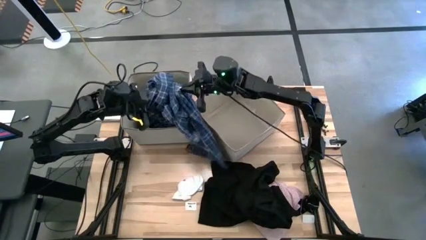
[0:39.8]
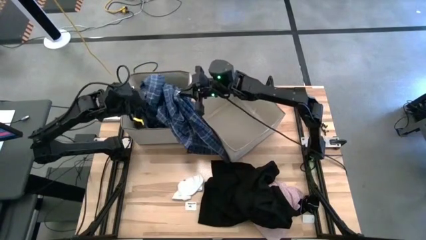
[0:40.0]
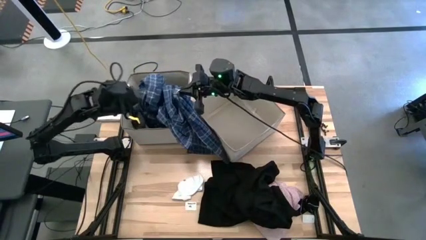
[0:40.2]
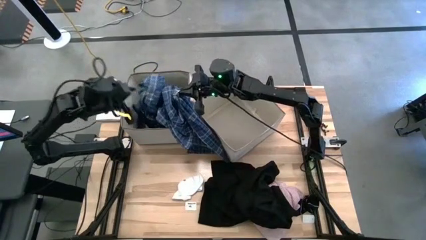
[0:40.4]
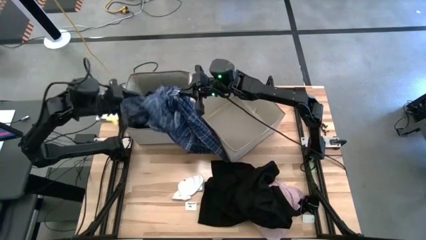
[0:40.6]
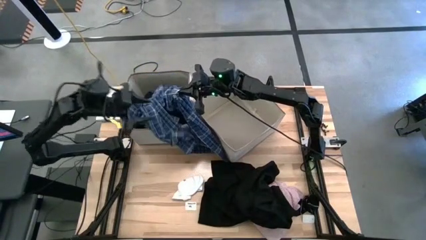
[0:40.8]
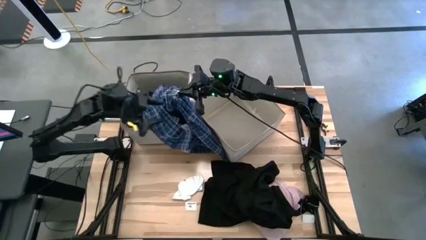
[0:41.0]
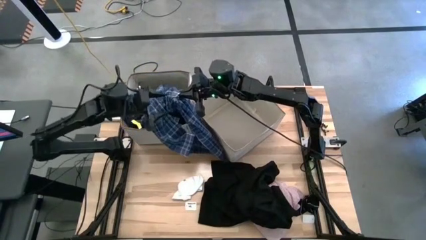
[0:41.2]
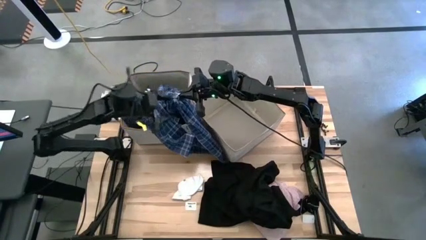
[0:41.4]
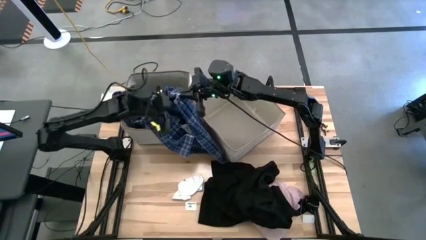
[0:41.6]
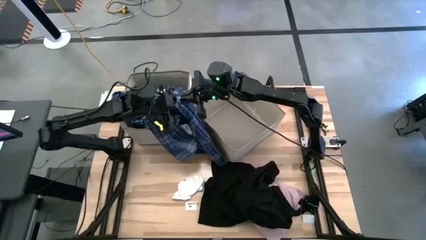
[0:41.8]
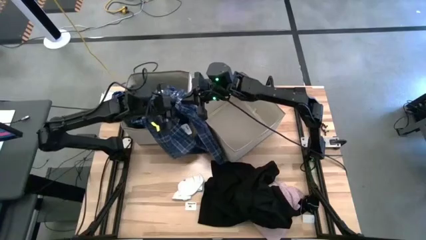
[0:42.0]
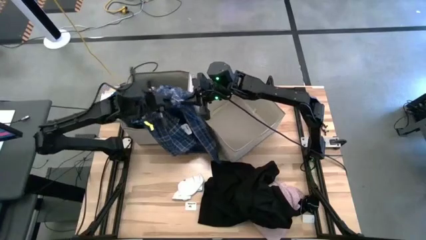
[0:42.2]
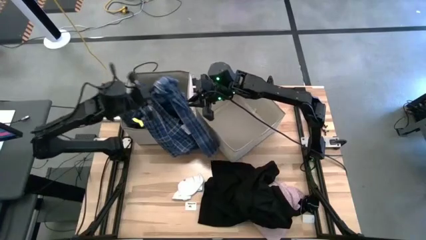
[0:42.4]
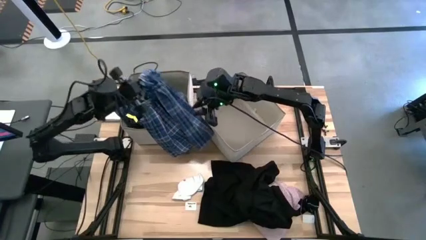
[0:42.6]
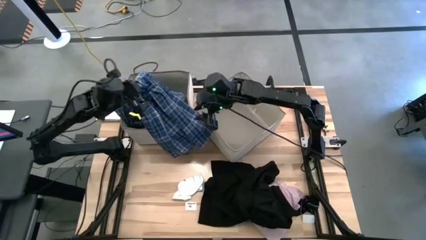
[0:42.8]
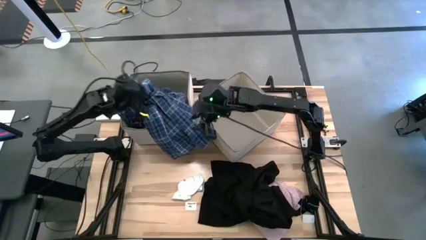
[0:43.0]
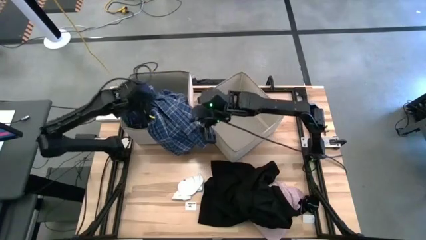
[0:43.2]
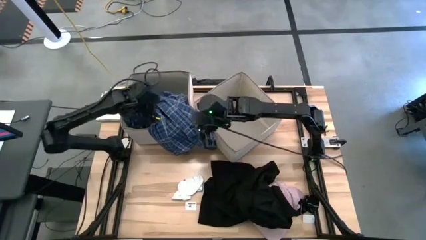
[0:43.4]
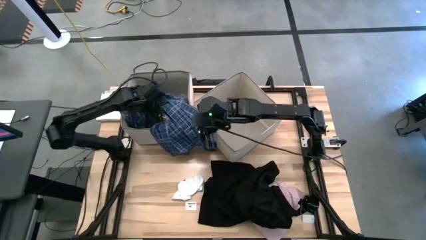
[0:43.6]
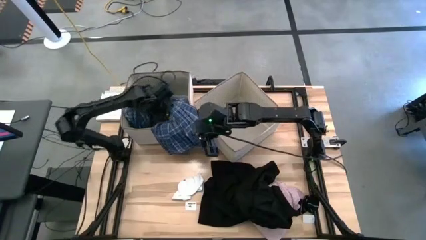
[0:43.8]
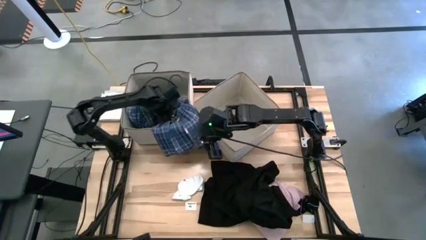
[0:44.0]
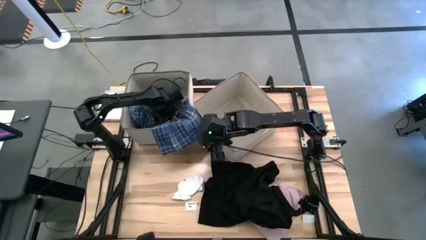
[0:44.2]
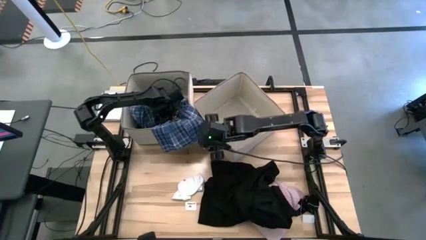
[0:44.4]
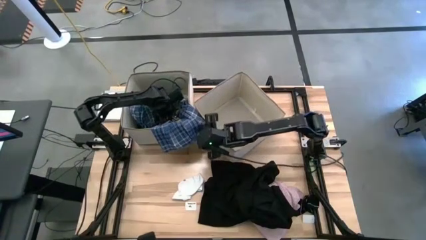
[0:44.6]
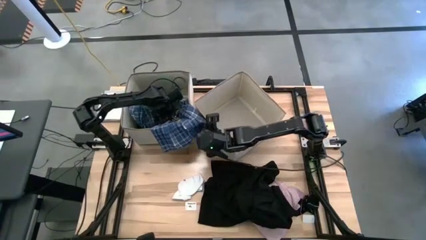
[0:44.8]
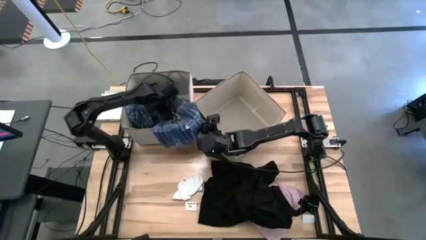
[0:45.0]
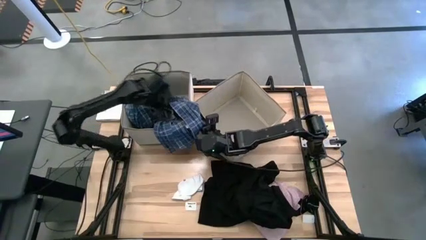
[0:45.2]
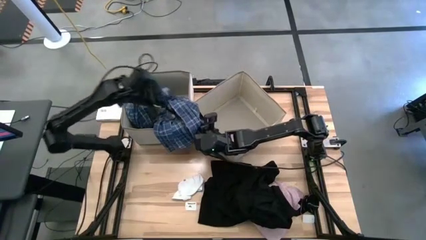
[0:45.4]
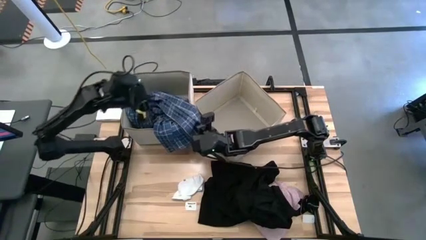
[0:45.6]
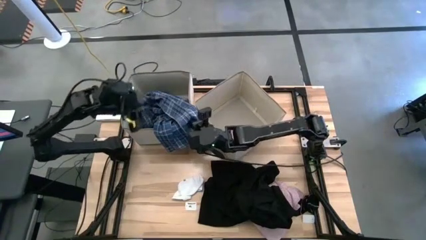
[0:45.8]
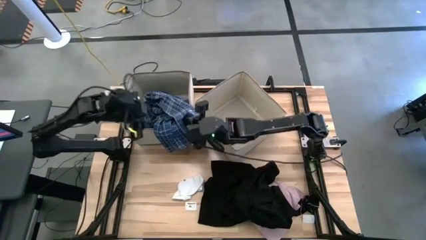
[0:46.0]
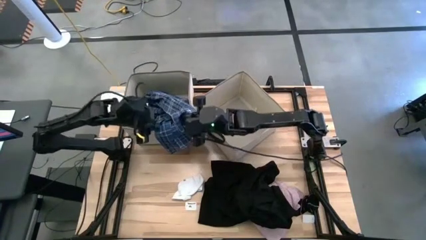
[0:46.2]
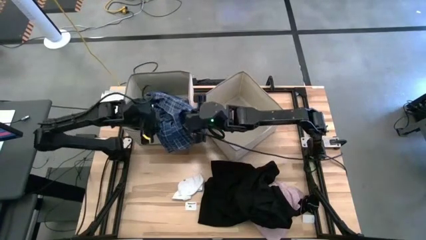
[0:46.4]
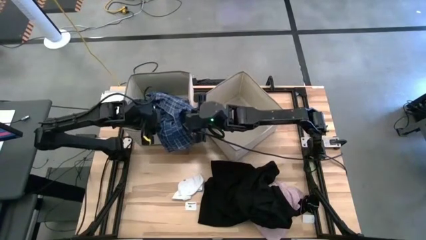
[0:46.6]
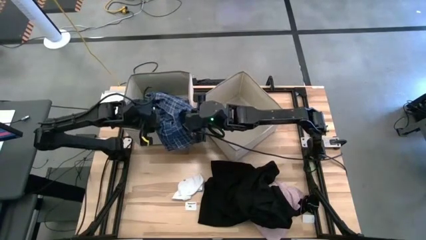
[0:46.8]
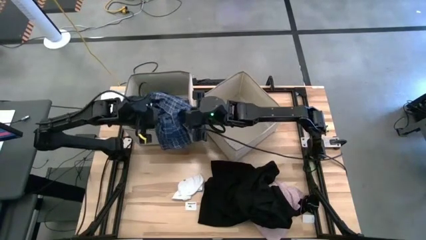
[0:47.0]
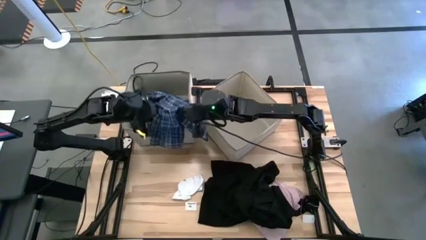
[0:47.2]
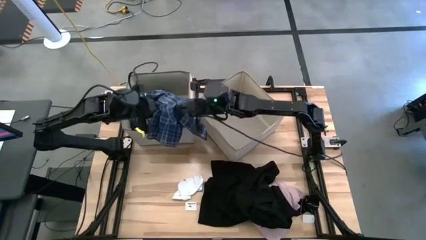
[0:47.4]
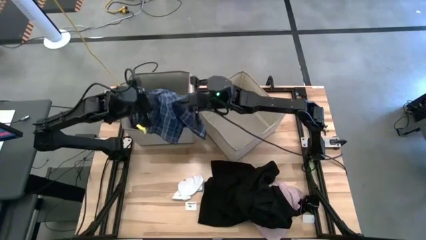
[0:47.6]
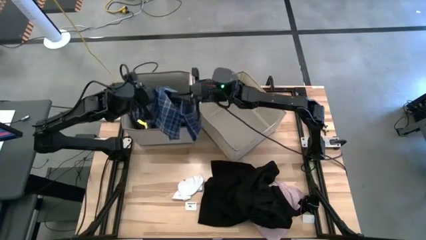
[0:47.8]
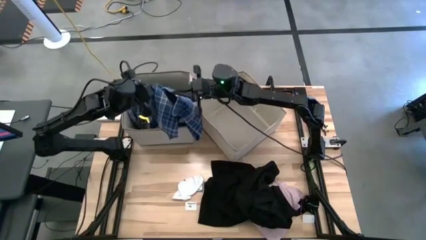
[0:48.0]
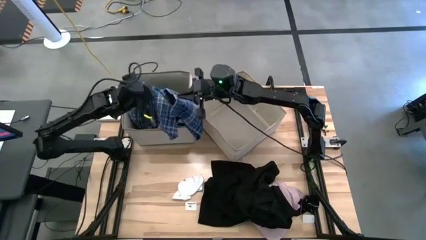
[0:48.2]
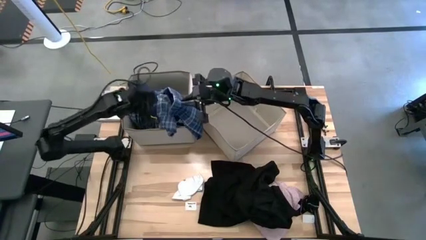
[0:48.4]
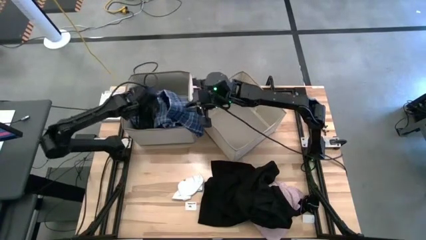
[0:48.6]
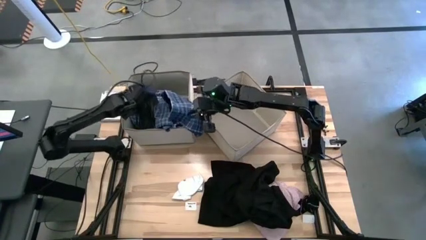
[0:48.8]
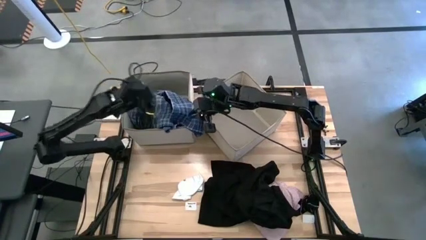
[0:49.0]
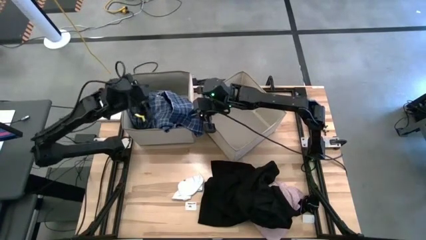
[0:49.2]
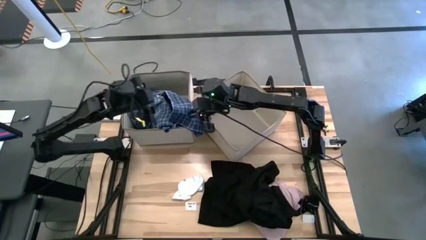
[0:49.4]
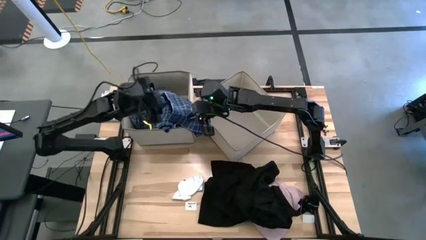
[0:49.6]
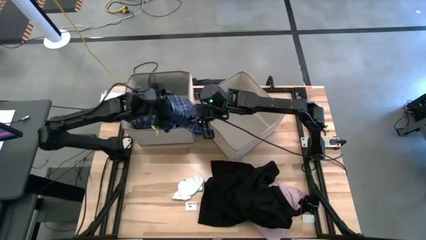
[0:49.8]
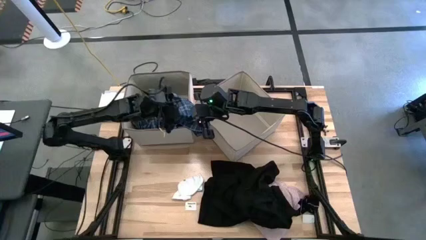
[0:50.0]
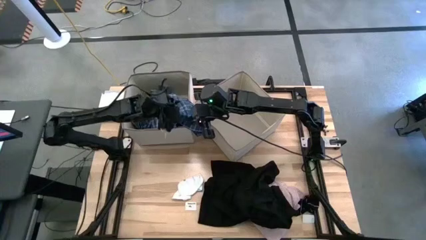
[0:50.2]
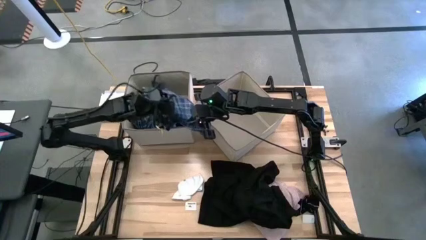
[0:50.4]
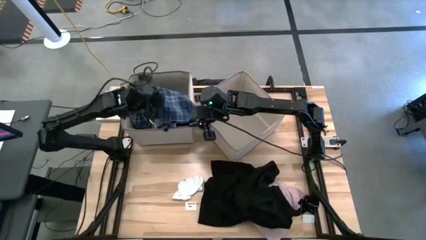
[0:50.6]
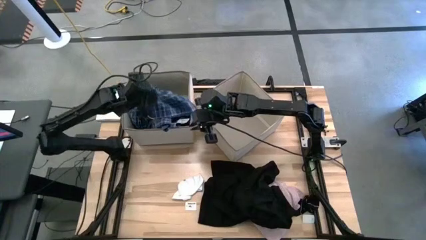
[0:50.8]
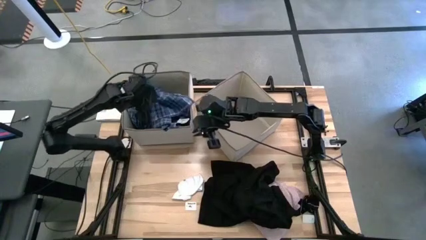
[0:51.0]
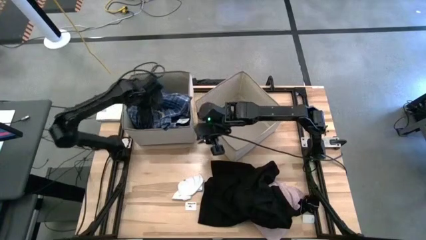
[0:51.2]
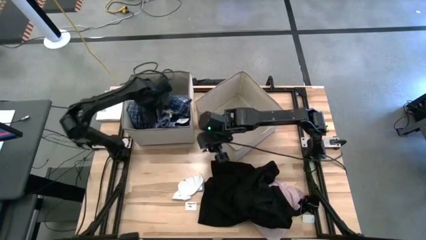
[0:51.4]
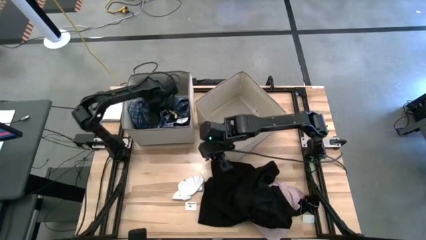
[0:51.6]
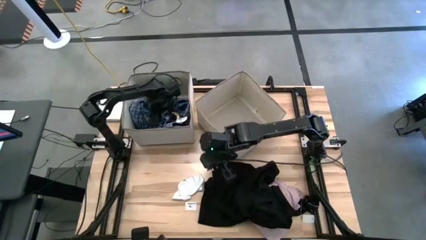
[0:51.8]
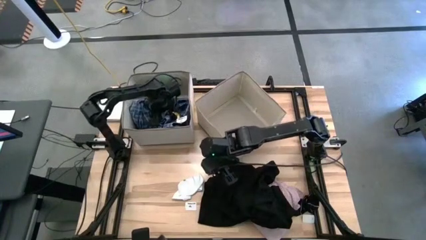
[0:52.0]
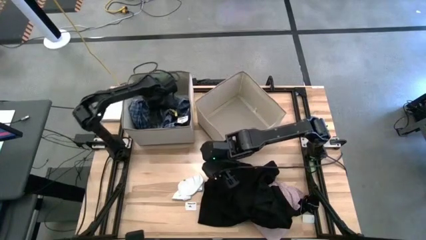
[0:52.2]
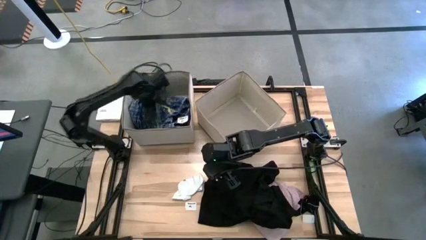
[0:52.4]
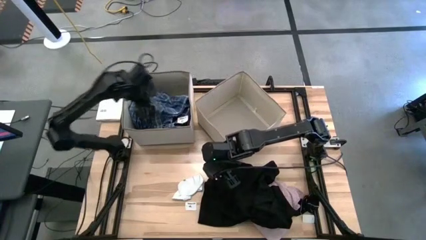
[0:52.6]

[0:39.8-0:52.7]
Task: Sort clothes
Put the blue checkered pants into the left laundry organizer

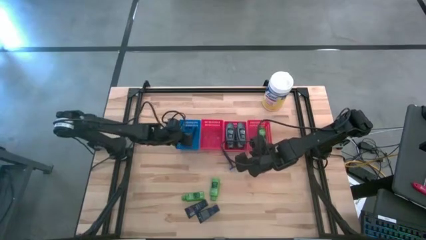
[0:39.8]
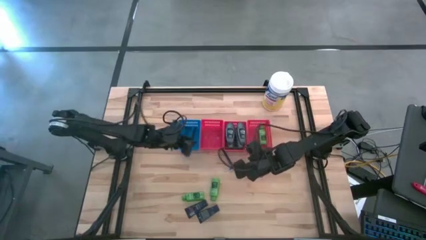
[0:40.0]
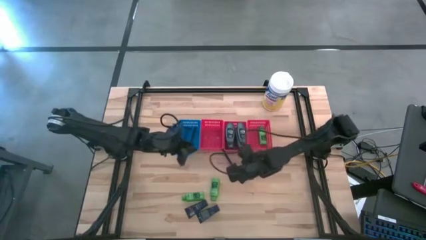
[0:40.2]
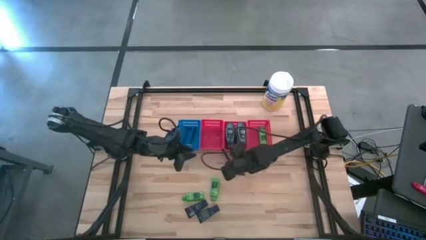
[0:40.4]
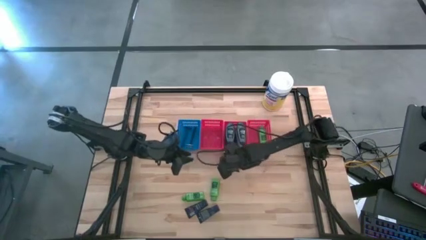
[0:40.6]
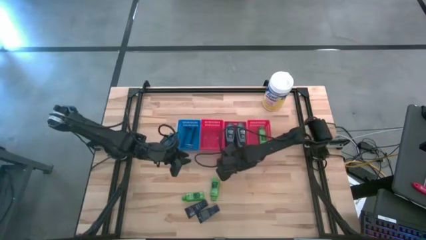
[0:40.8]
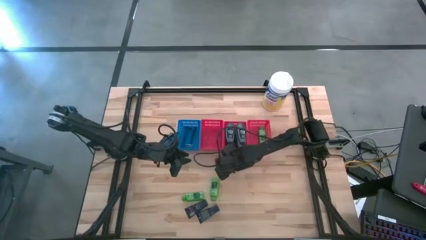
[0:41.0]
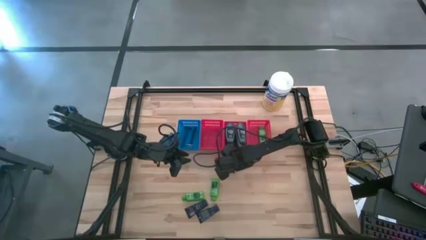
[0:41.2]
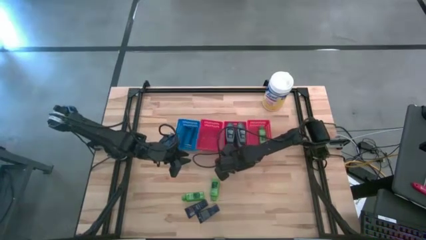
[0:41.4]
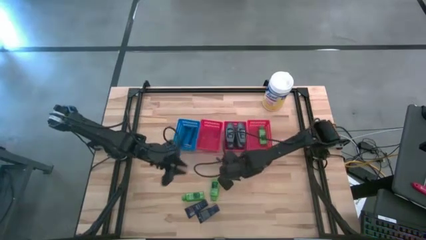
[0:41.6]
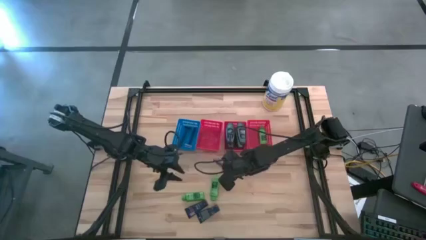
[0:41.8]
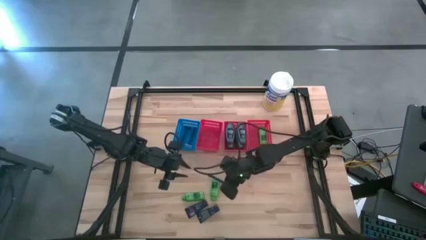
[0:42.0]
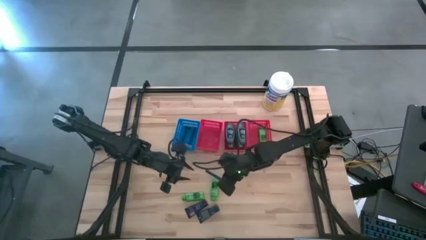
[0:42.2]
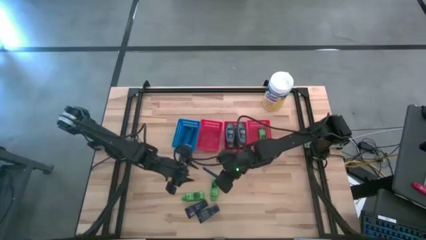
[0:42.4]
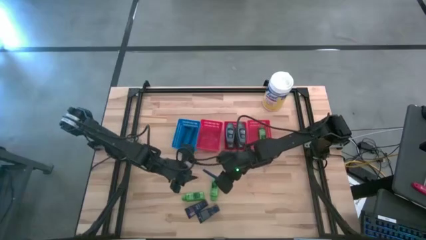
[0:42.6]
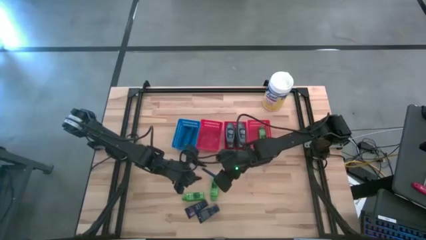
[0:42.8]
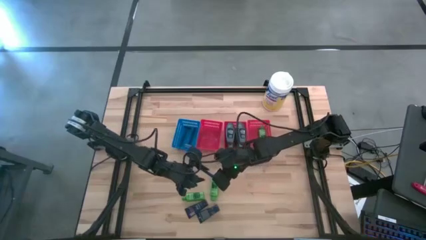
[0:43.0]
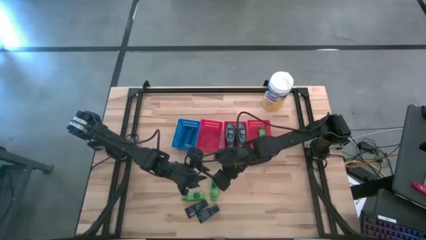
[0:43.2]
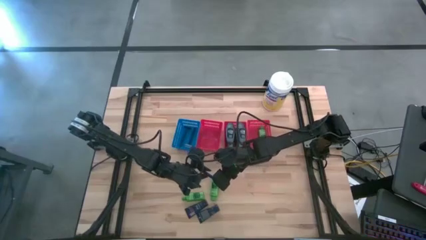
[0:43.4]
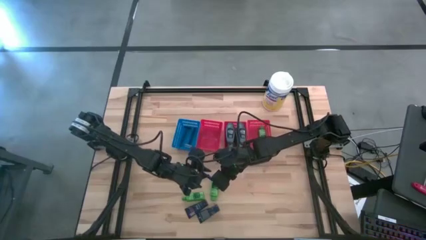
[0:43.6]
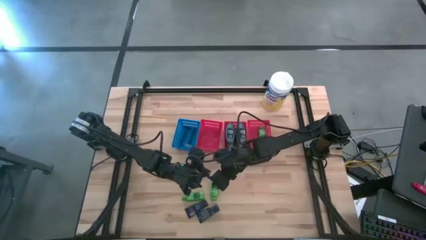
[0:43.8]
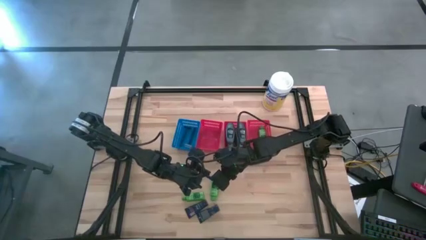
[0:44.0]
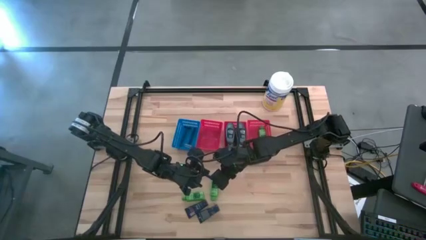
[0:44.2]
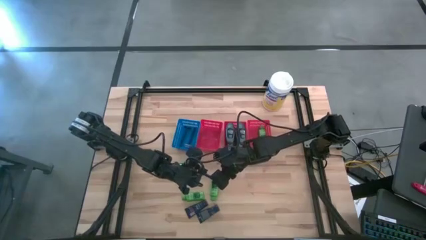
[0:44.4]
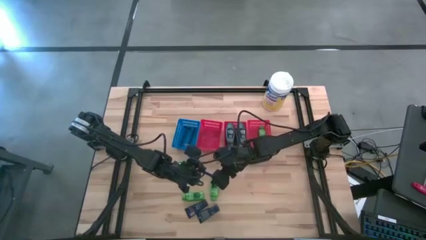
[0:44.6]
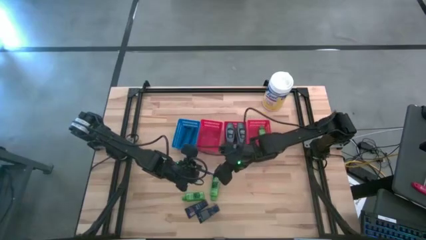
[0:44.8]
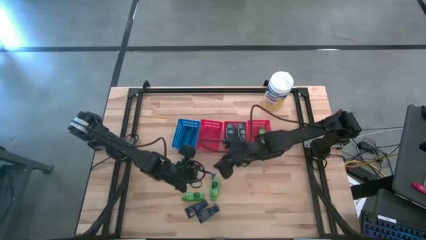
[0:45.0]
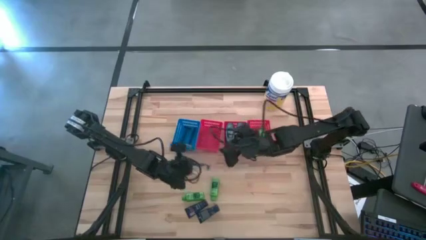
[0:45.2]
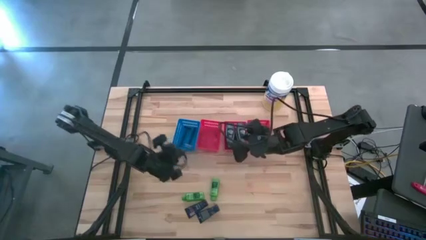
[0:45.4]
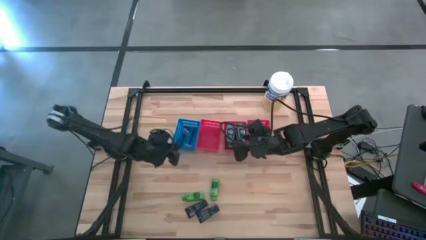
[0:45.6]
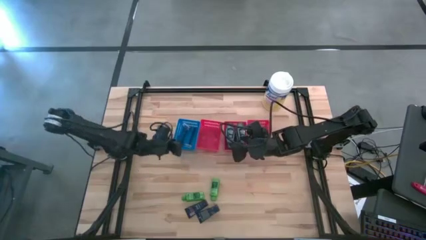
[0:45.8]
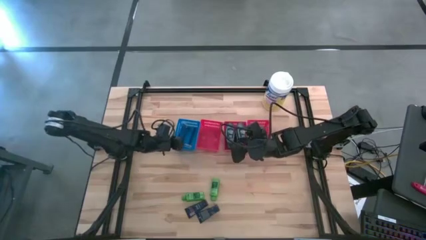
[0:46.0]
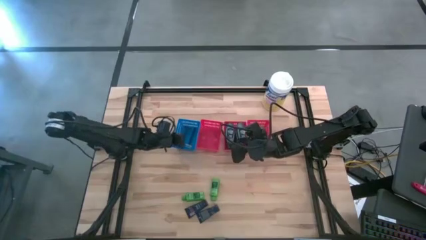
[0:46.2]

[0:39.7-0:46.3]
Task: Pick & Place Travel size toiletries
Put the blue razor into the blue bin
